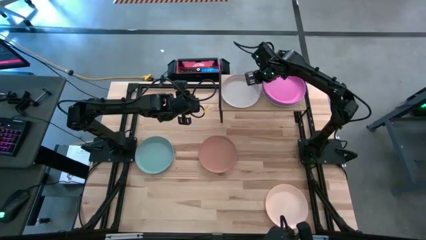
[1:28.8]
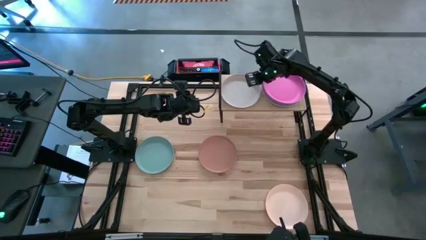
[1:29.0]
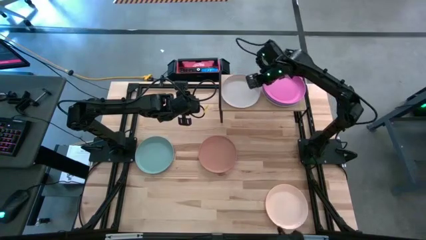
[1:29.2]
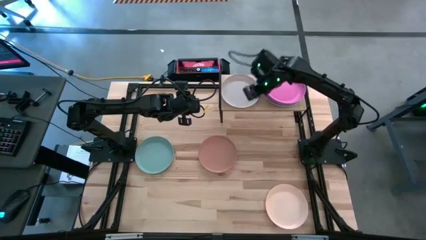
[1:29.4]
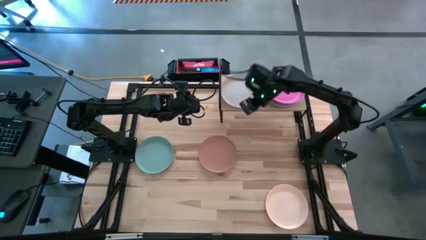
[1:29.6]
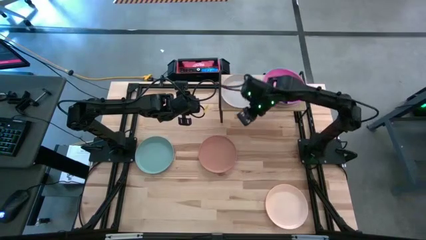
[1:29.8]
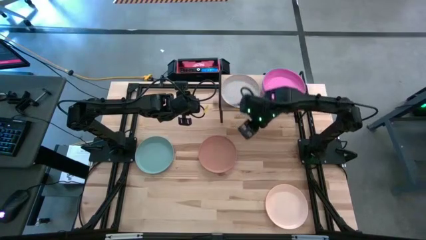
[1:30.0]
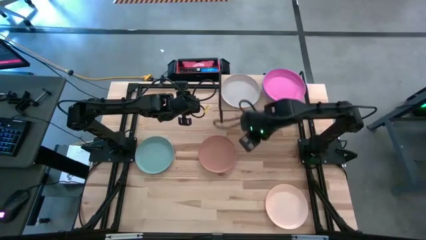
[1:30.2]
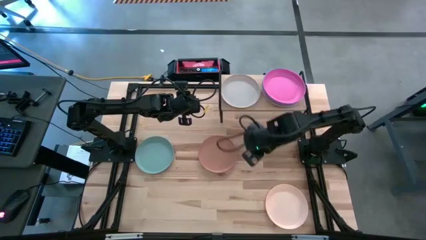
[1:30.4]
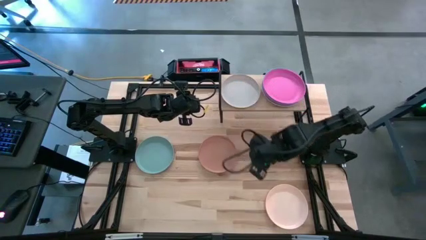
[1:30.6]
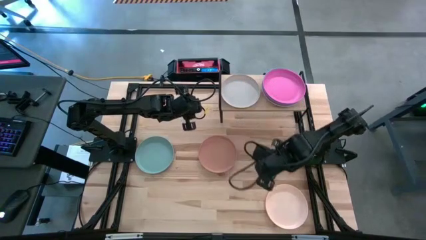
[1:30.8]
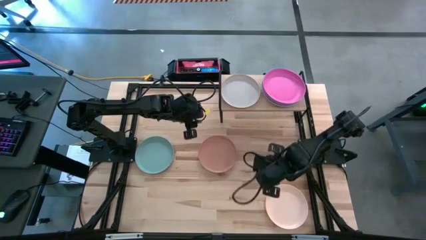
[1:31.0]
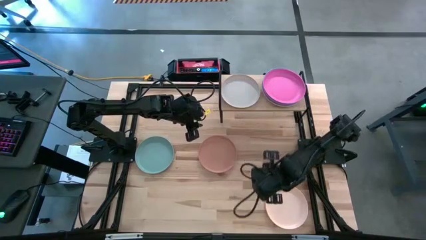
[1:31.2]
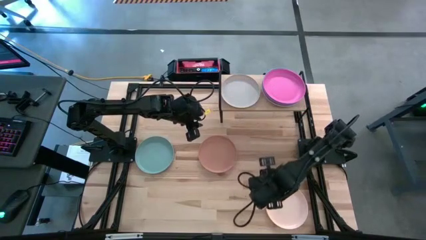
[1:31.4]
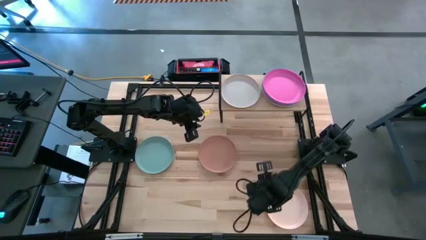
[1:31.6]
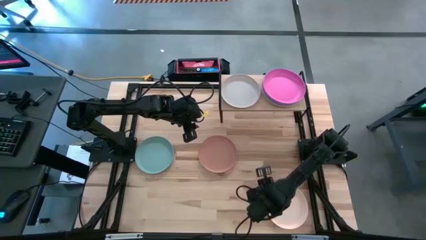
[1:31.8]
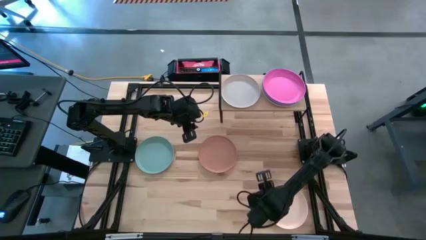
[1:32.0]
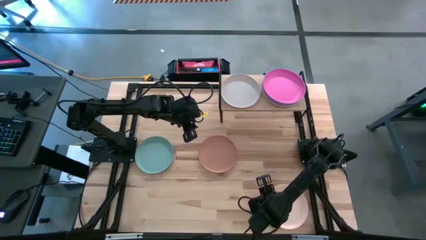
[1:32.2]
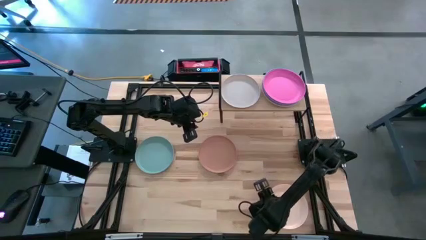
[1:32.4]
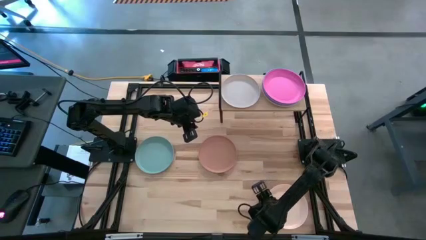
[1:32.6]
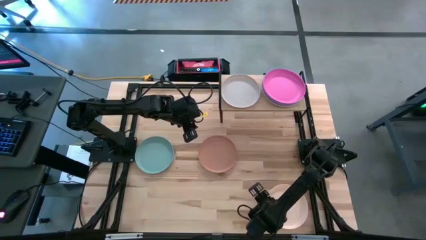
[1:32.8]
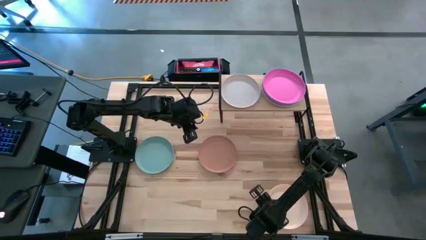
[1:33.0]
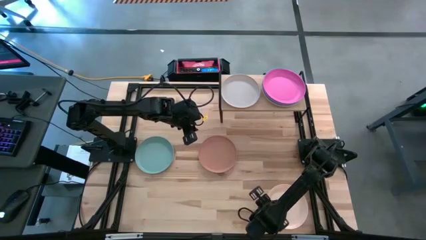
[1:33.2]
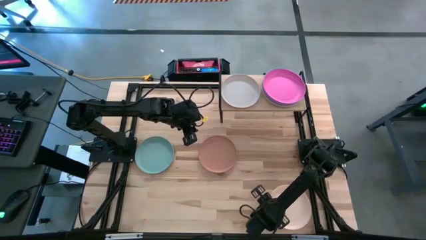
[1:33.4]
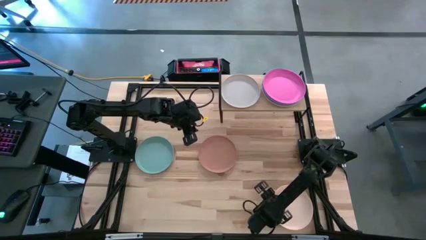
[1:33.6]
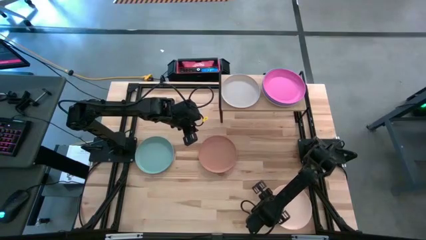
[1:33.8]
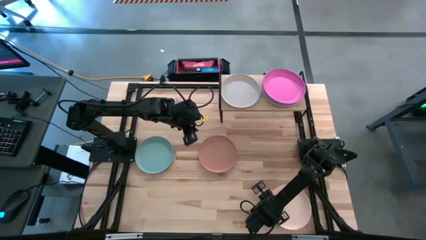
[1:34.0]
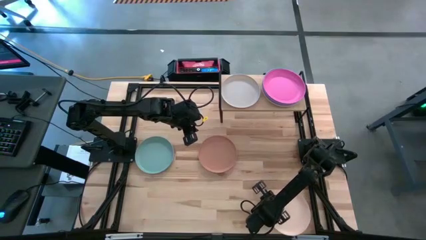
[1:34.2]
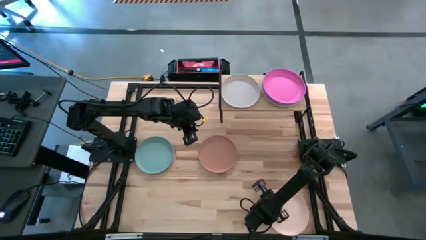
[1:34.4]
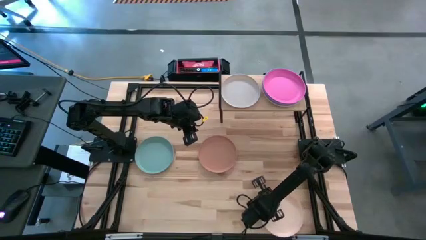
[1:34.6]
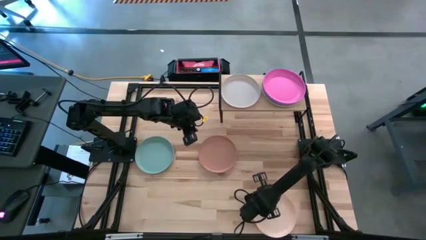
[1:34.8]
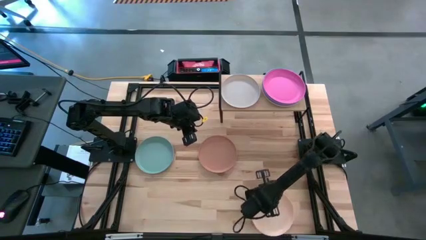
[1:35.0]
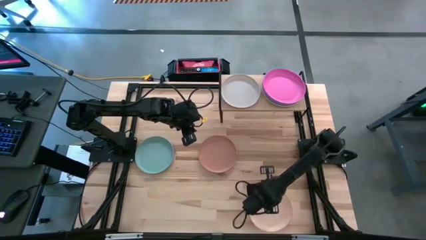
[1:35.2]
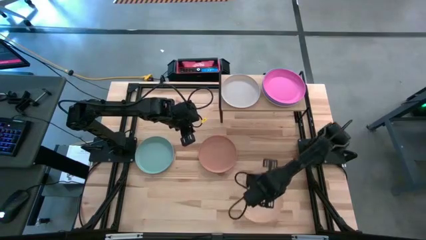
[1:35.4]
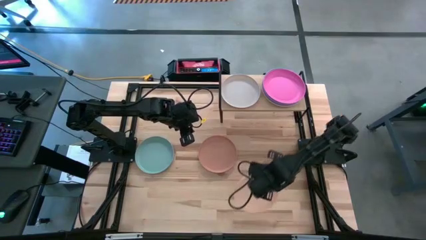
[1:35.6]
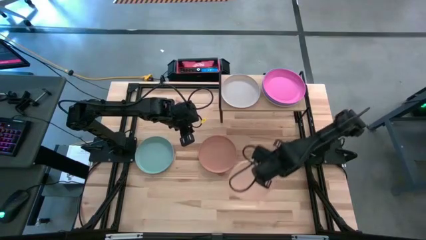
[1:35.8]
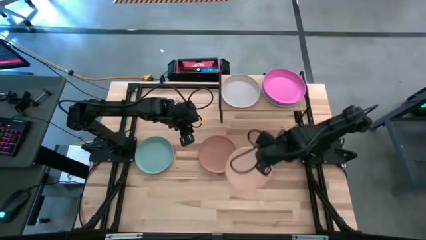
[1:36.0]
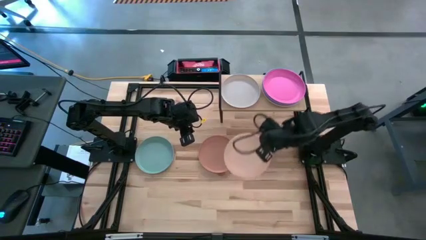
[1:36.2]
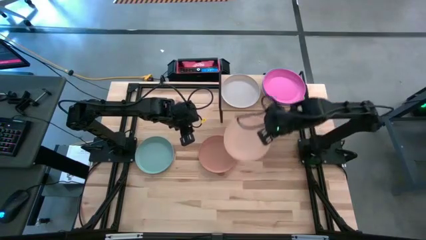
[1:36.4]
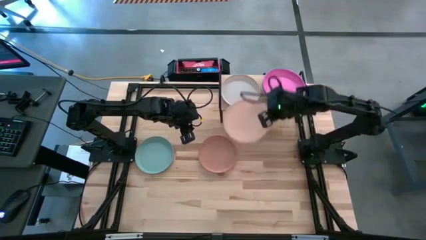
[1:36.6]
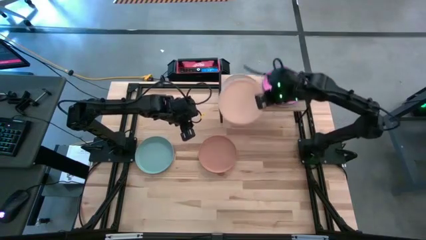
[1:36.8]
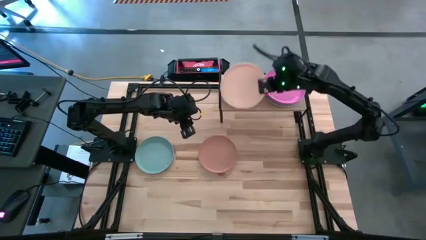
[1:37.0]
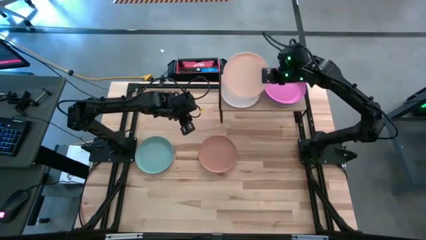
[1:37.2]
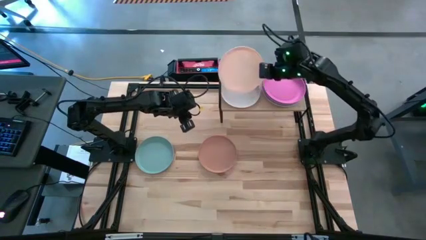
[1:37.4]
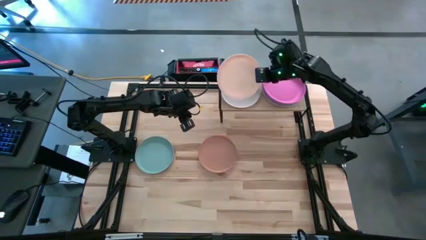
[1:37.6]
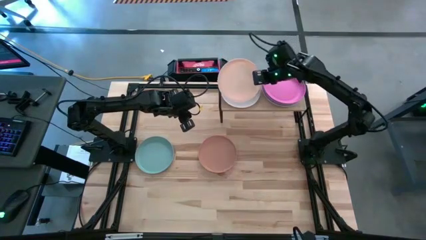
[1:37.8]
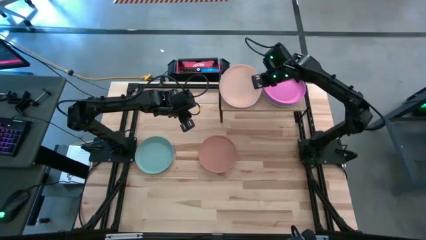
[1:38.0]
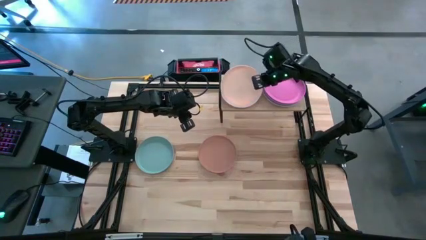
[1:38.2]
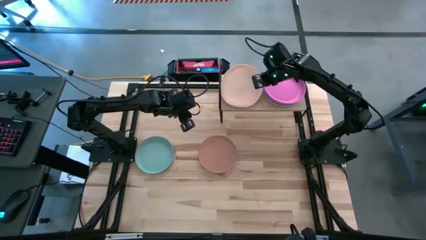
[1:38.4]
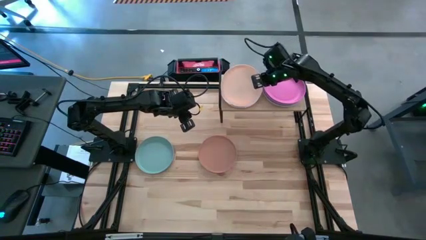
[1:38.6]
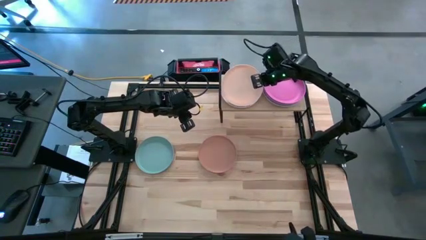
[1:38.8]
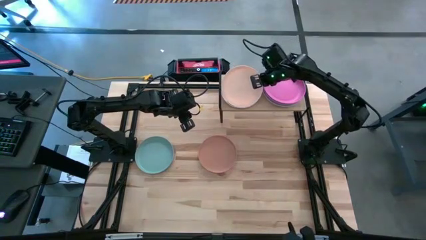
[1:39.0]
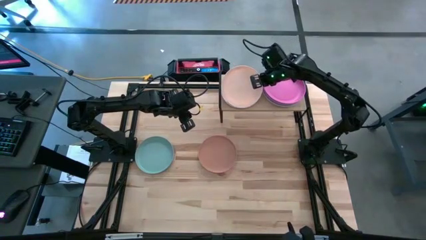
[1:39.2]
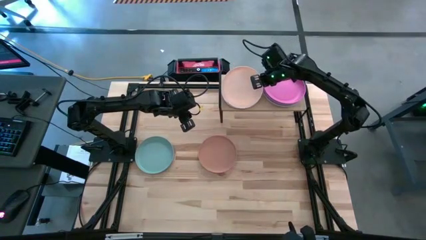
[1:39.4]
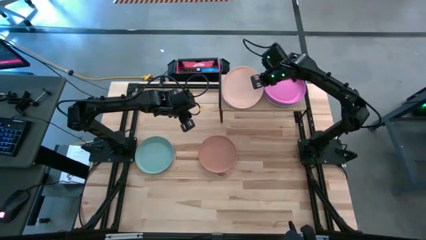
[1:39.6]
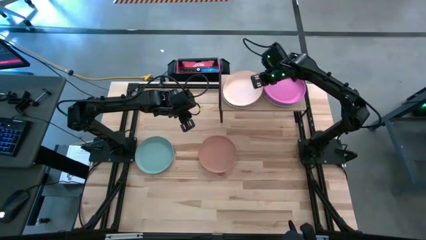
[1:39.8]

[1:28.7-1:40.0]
Task: Place and stack plates onto a shelf
Stack the light orange plate on top of the white plate on the shelf

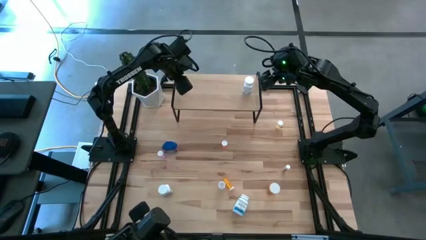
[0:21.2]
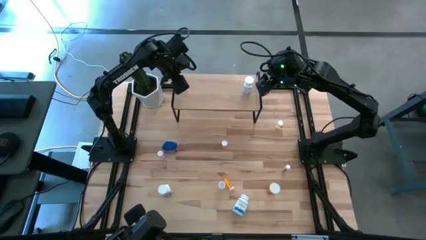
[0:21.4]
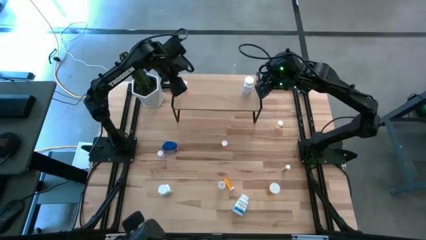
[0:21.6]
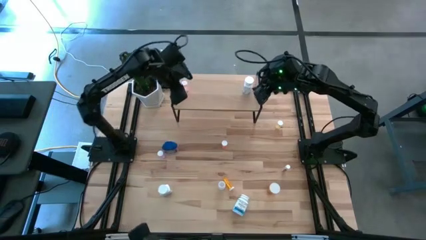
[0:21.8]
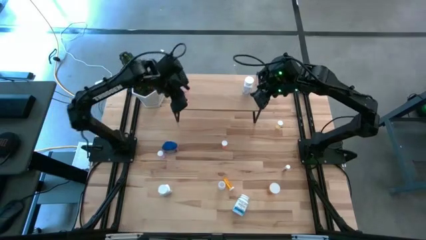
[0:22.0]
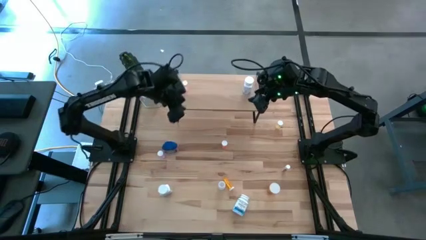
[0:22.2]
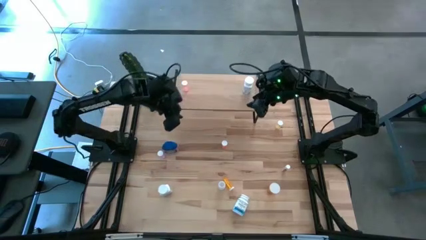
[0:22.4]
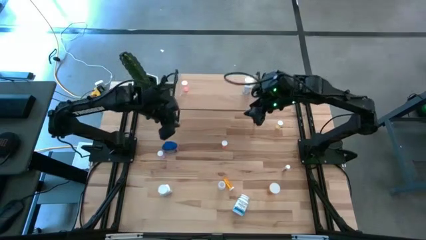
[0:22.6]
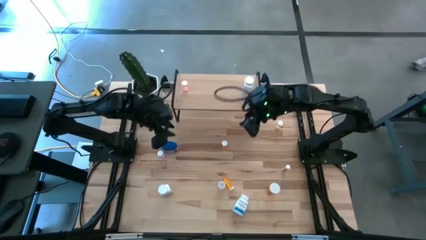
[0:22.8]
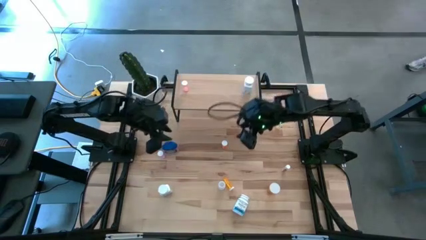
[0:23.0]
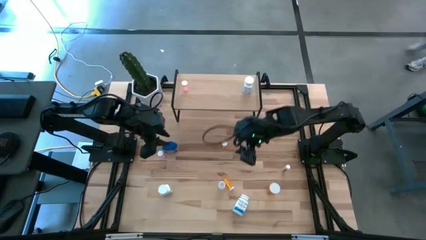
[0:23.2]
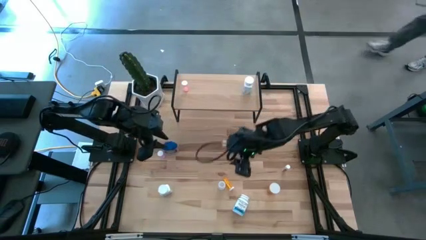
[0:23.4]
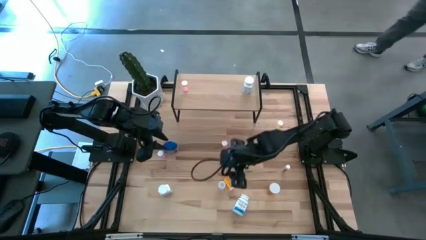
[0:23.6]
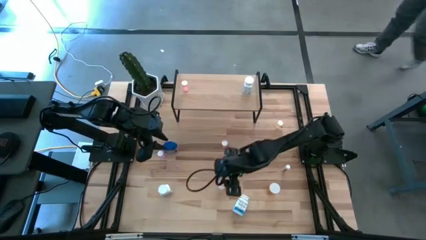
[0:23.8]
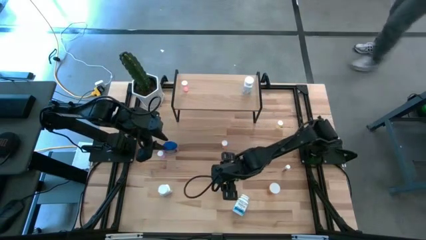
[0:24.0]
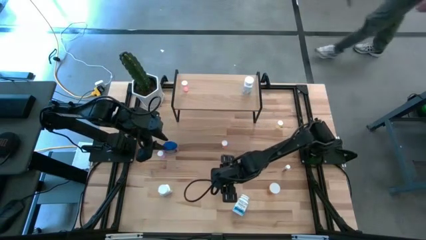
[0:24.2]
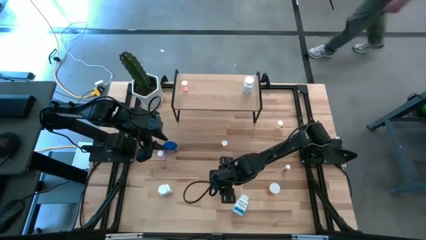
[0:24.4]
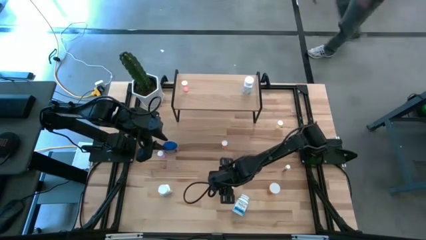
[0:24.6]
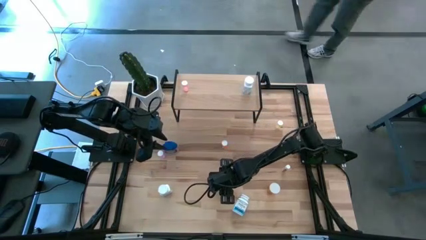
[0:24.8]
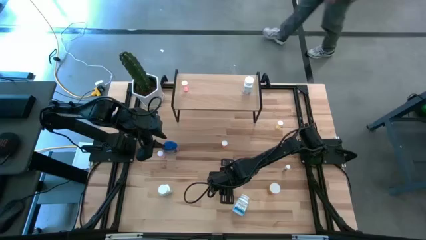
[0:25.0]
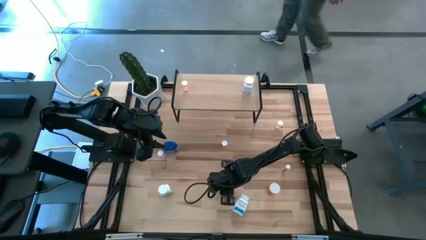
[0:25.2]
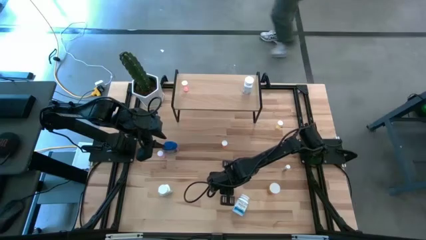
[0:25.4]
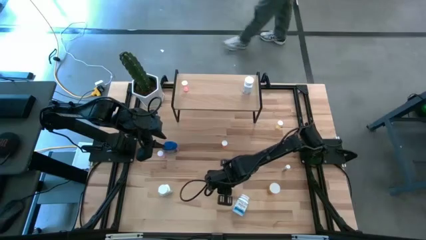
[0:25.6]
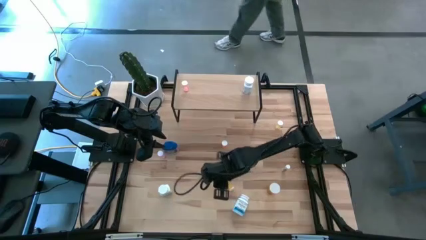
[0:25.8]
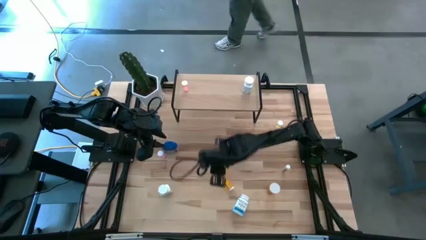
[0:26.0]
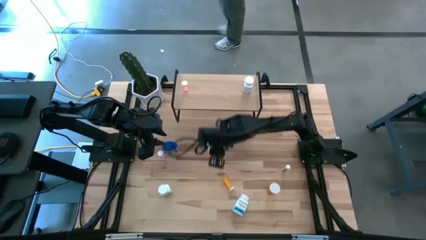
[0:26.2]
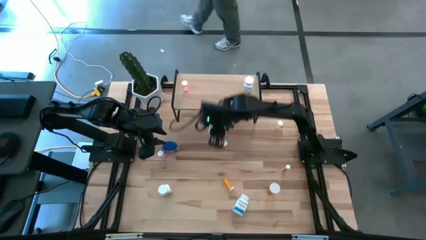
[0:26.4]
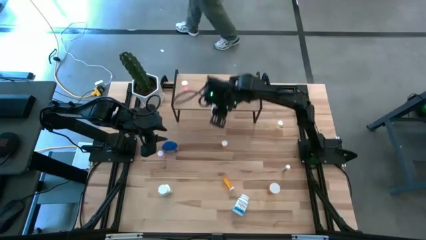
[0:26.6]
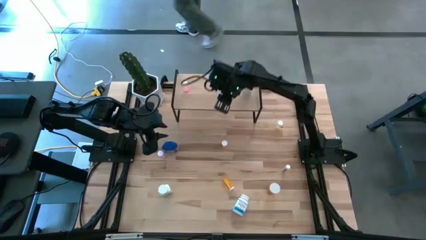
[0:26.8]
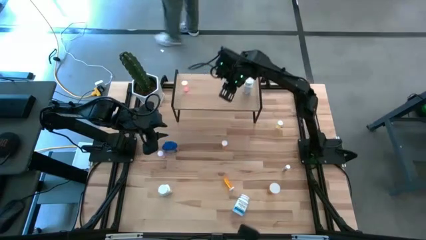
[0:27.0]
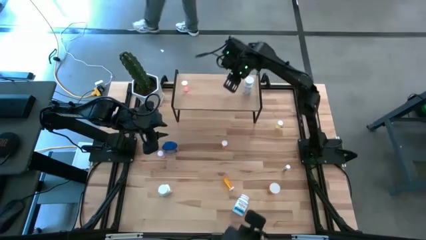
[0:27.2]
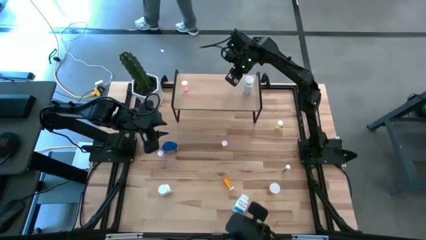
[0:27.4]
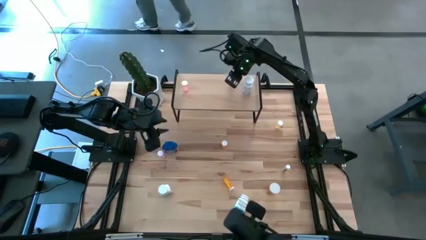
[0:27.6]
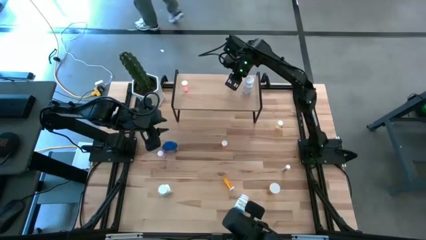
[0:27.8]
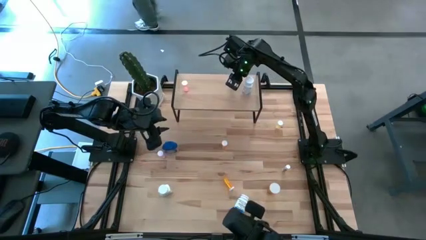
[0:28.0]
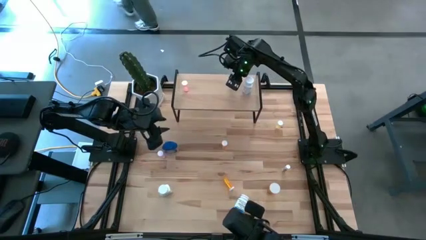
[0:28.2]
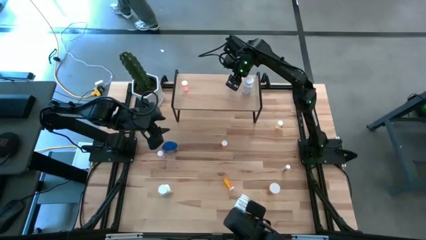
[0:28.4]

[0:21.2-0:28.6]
Task: Pick and place medicine bottles onto shelf by color
Put the transparent small pill bottle on the shelf
